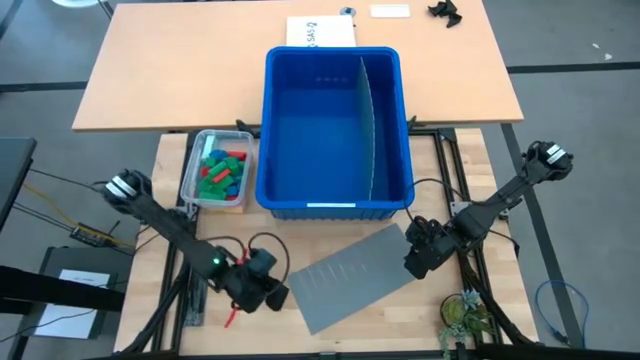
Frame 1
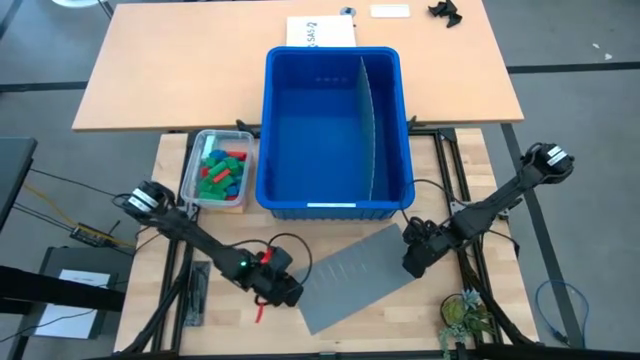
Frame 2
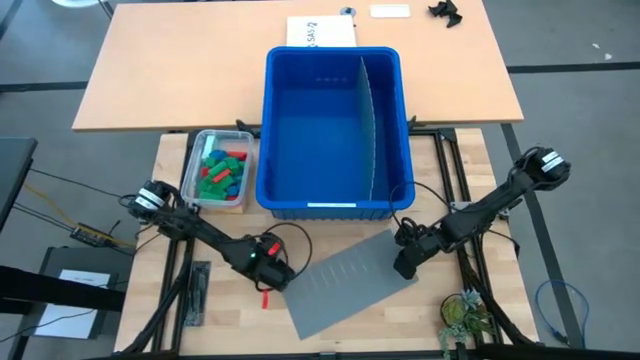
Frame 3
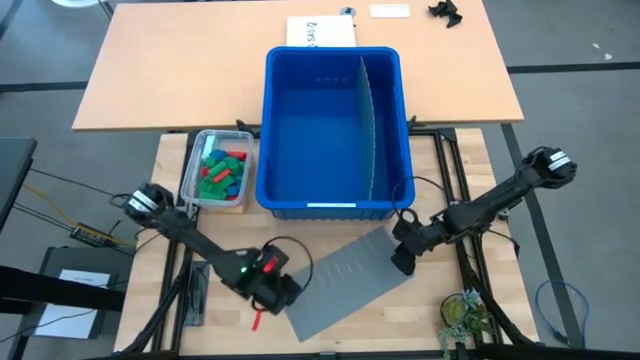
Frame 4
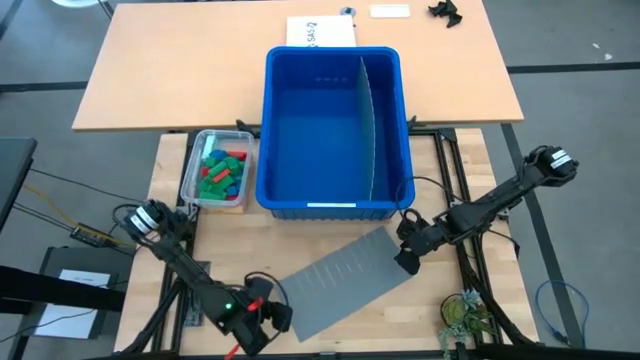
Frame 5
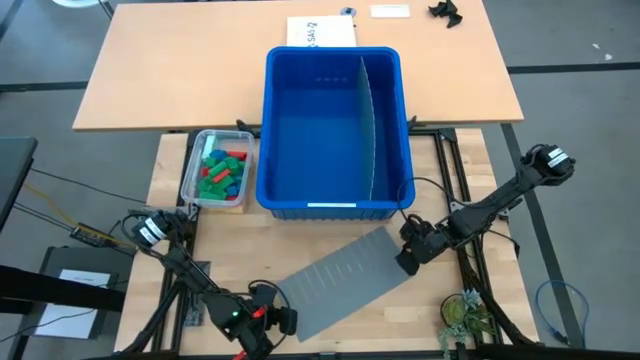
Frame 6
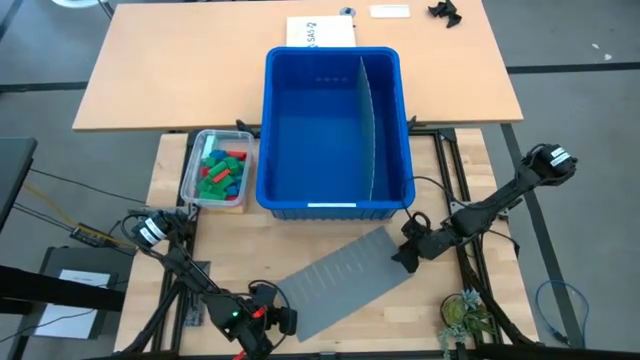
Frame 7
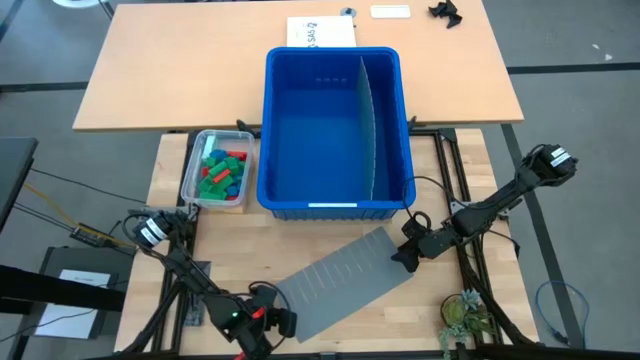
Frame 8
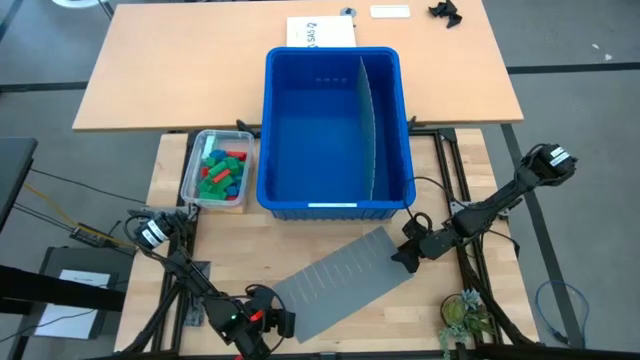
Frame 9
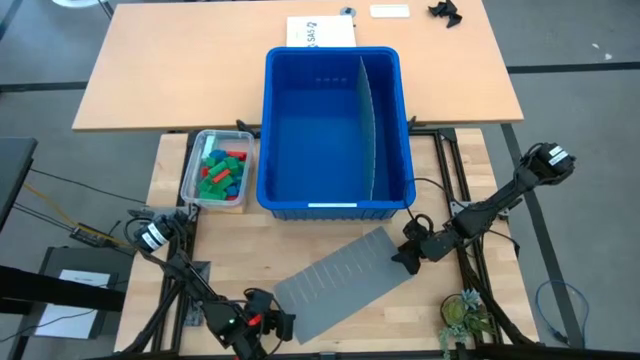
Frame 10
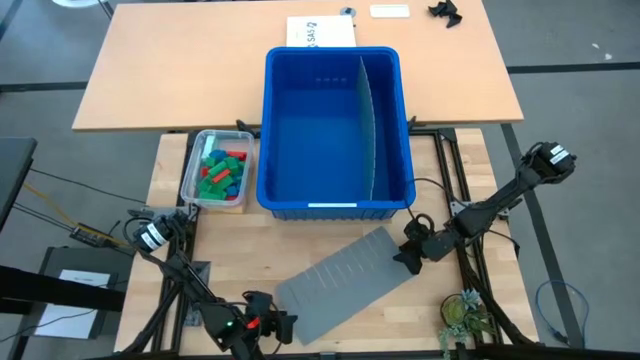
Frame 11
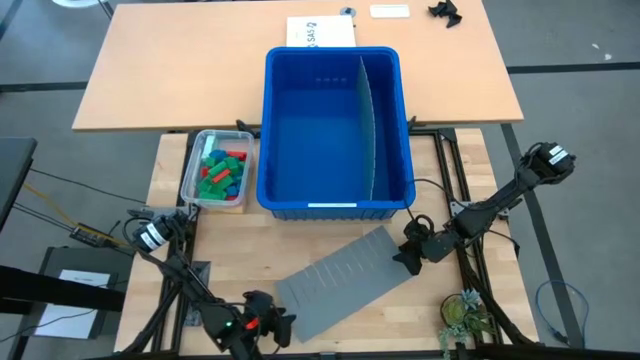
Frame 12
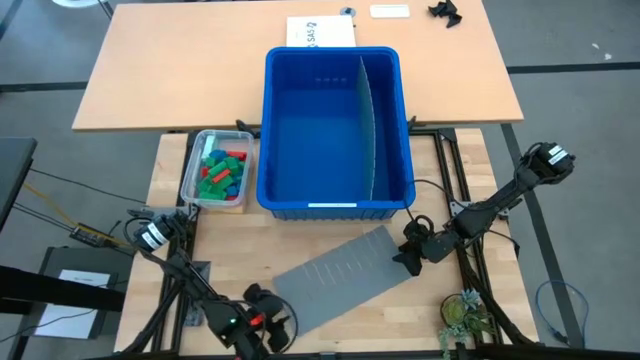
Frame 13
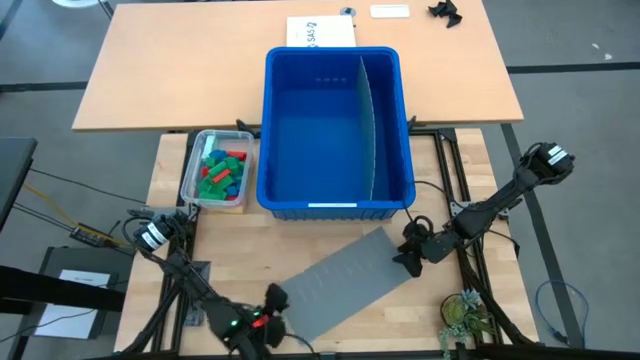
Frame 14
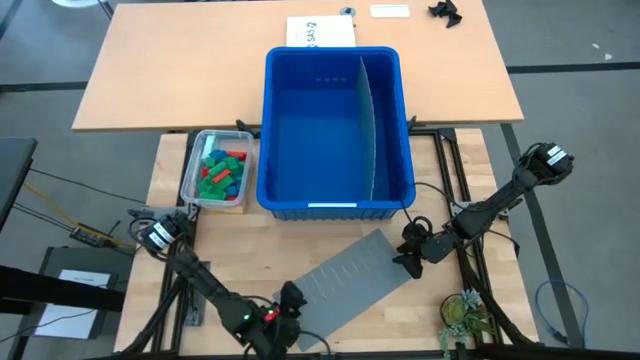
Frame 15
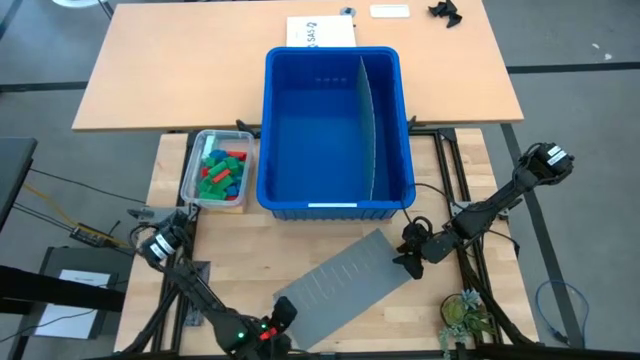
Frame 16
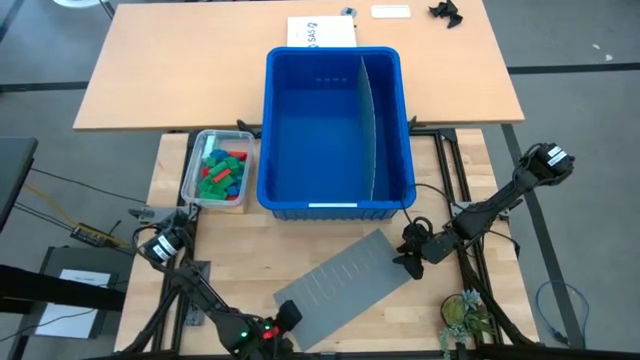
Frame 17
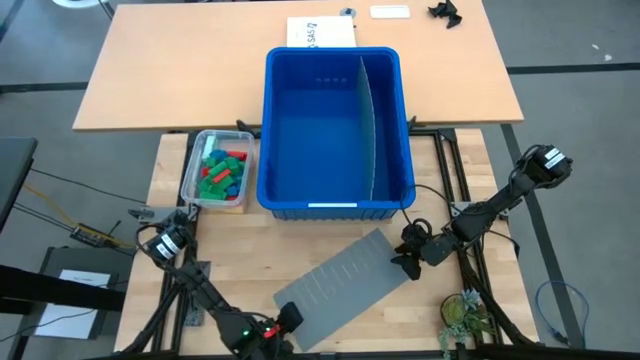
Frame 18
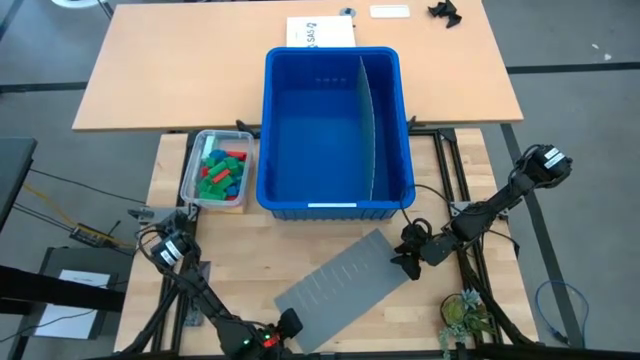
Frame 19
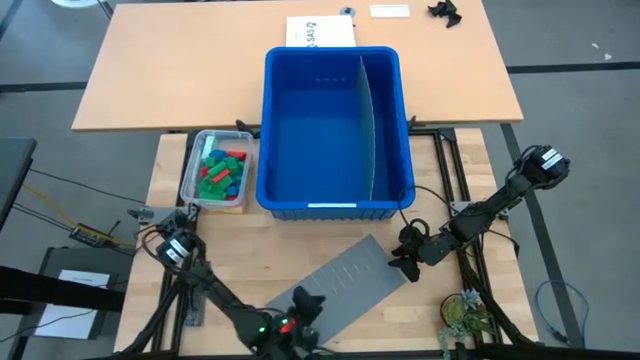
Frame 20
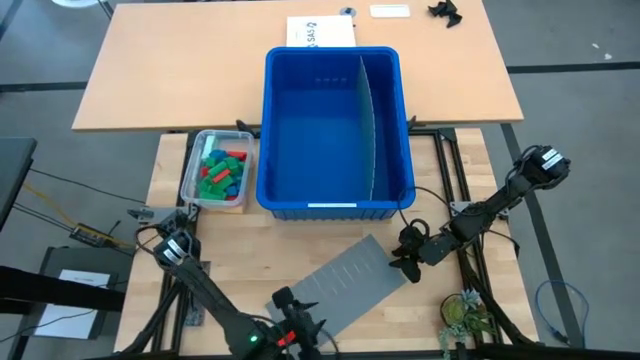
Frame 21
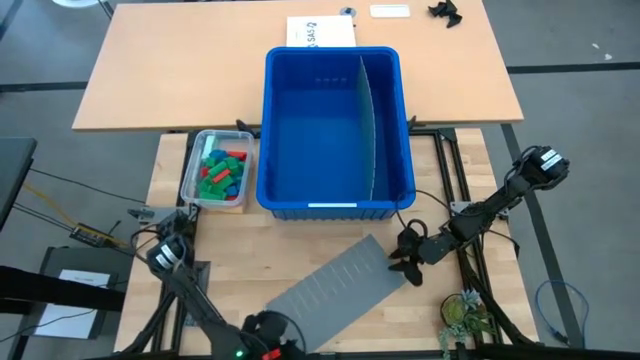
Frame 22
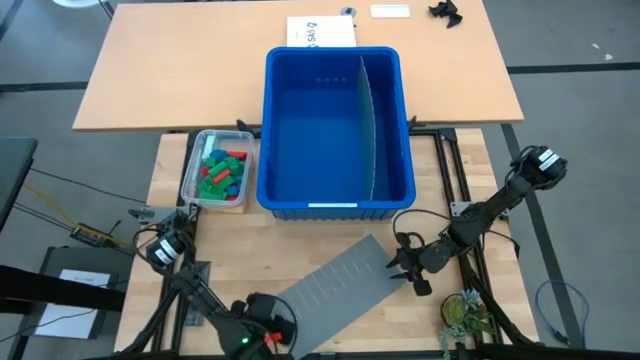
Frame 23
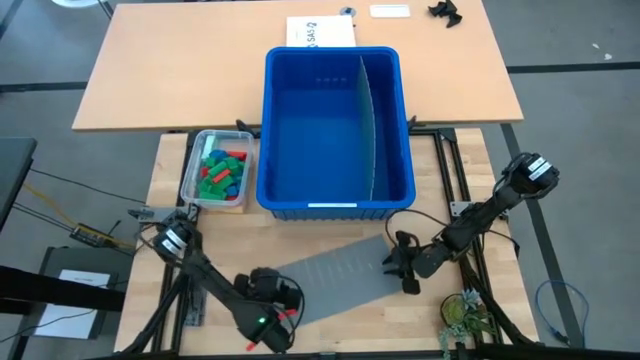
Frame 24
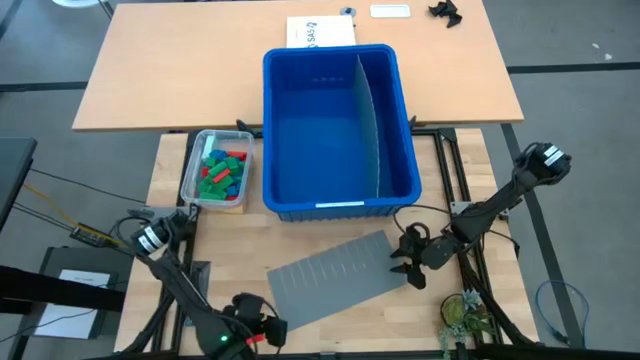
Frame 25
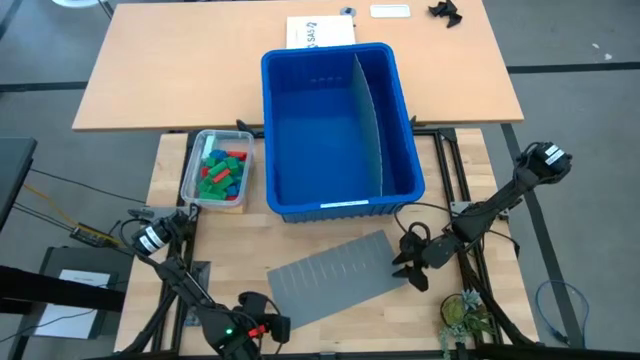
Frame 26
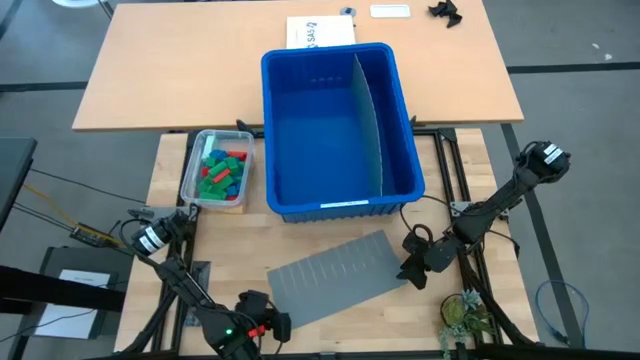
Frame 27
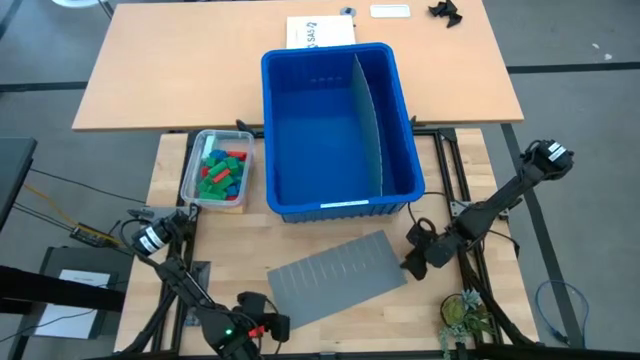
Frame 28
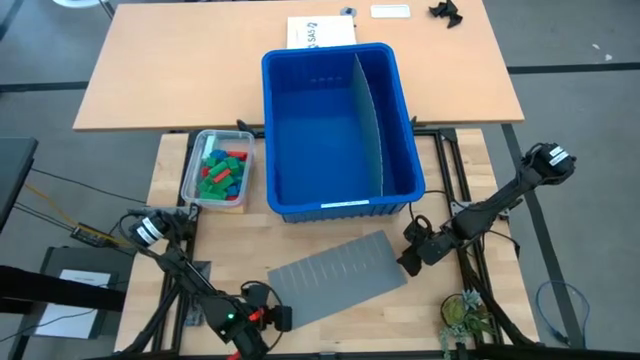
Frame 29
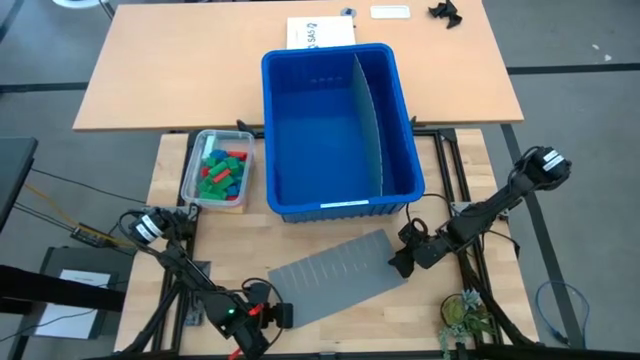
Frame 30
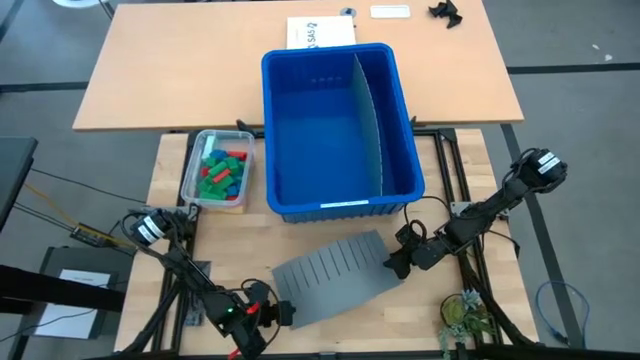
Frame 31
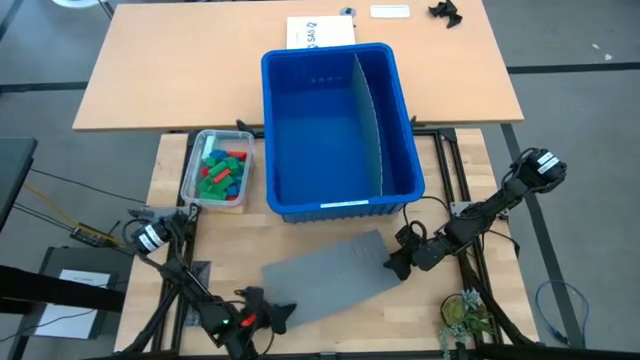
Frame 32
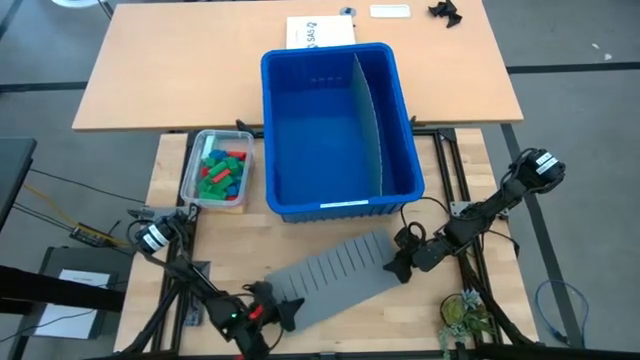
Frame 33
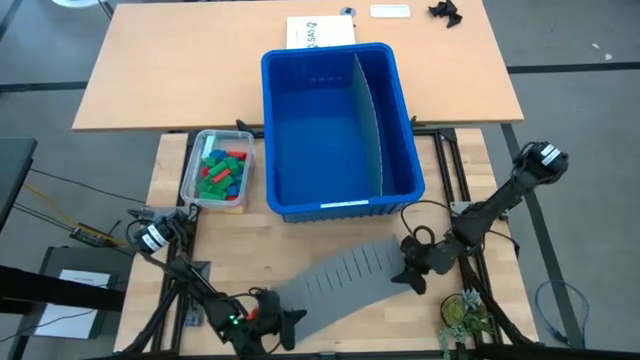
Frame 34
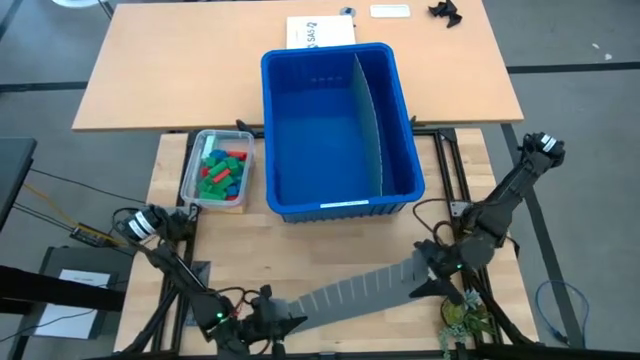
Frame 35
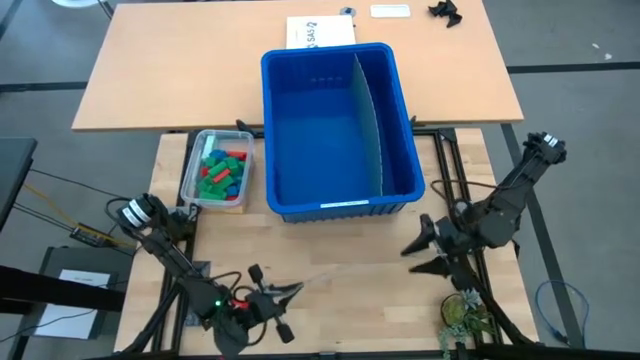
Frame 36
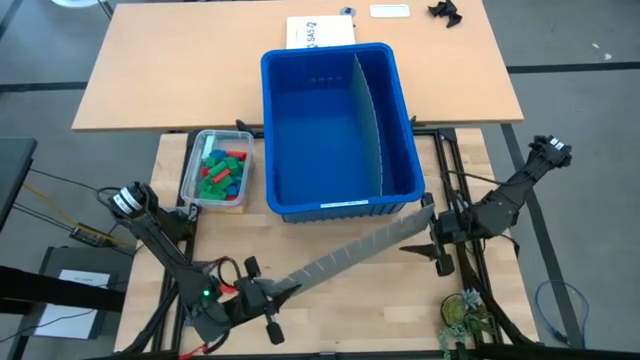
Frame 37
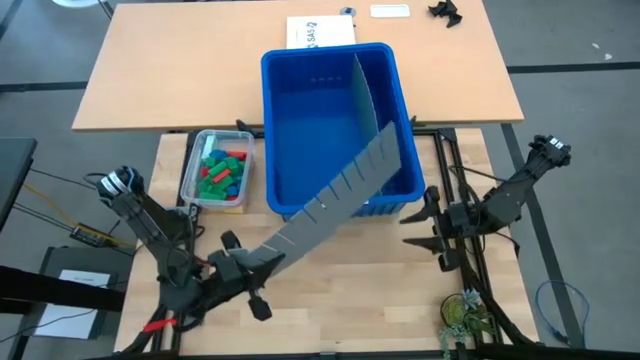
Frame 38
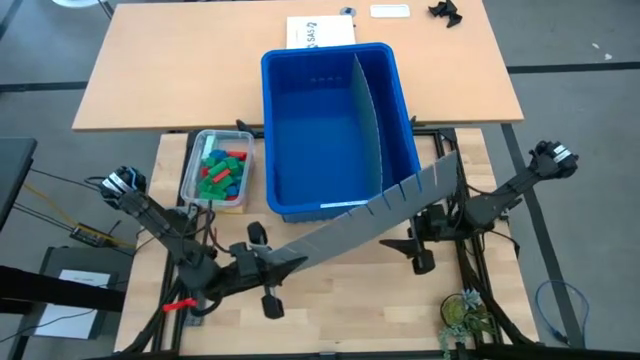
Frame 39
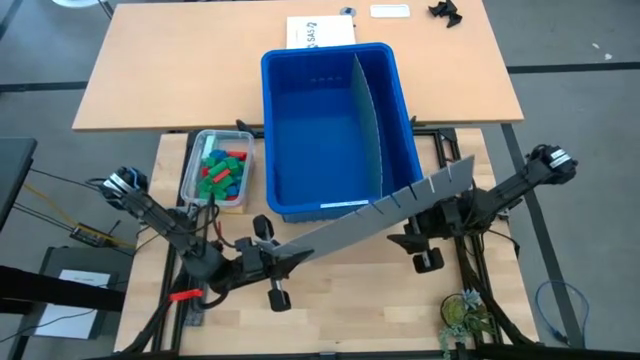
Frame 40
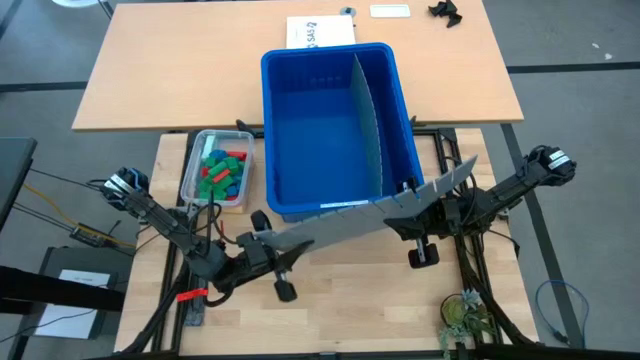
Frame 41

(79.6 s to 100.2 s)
Task: Sort blocks
Assemble the blue bin using bin divider
